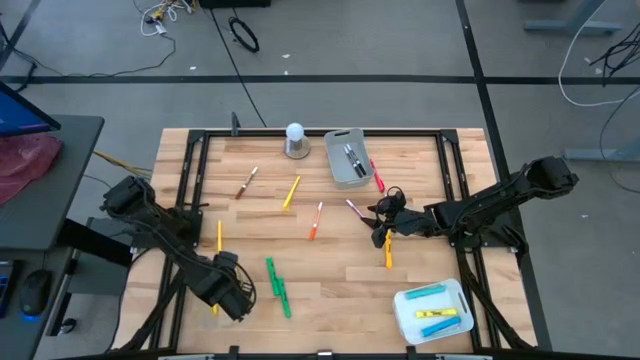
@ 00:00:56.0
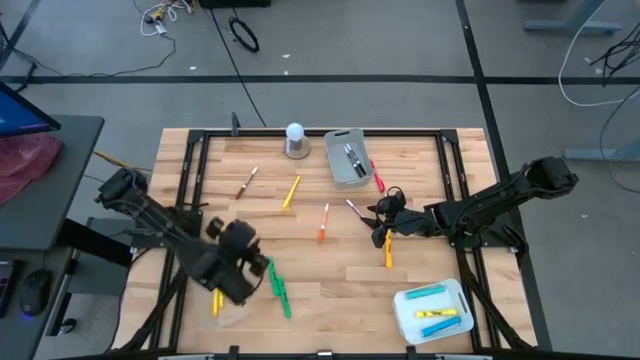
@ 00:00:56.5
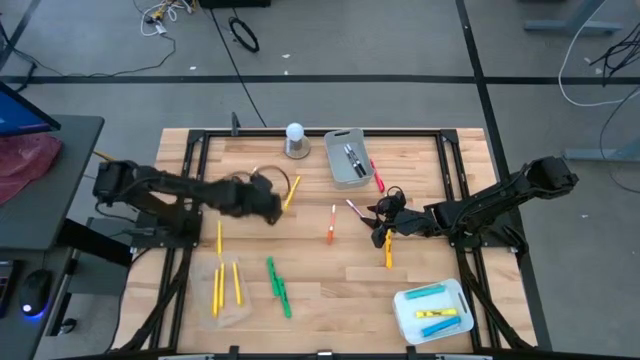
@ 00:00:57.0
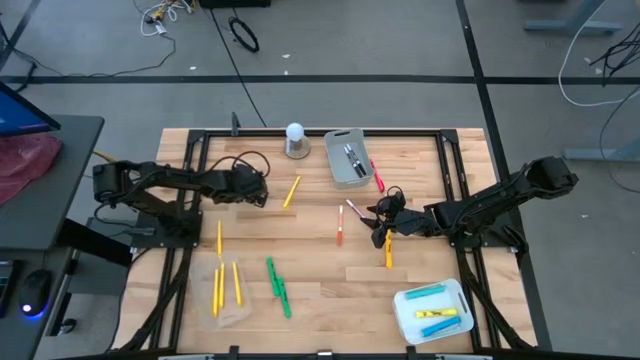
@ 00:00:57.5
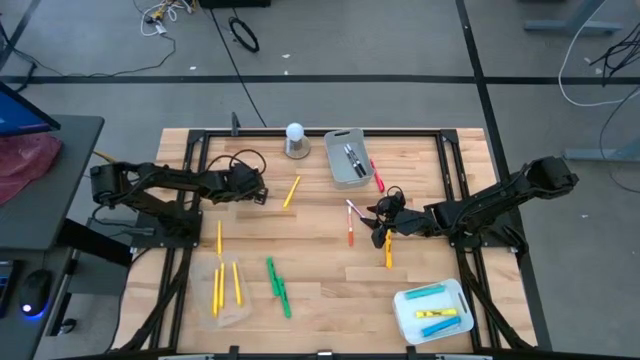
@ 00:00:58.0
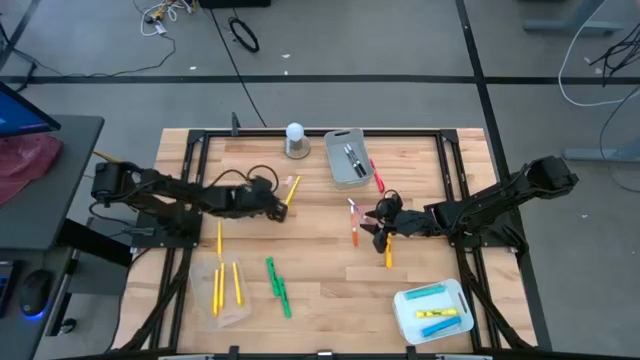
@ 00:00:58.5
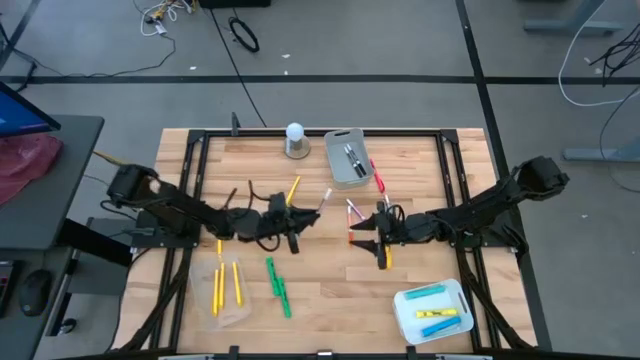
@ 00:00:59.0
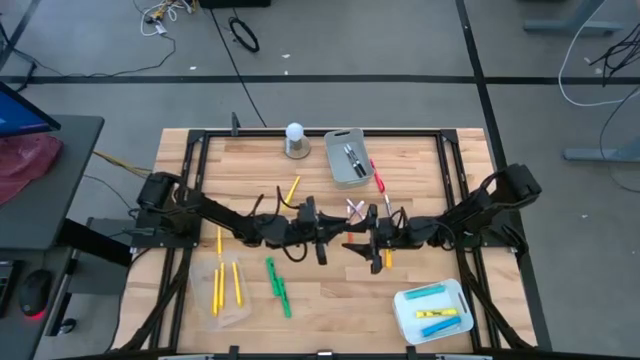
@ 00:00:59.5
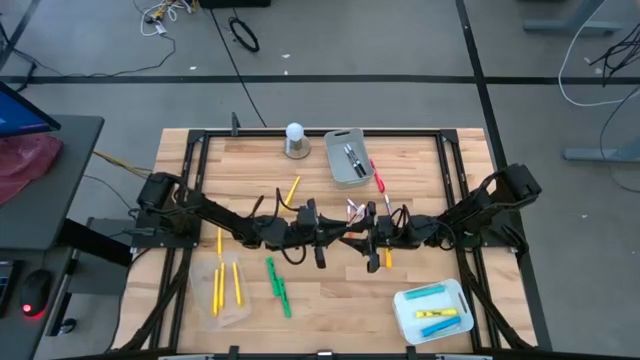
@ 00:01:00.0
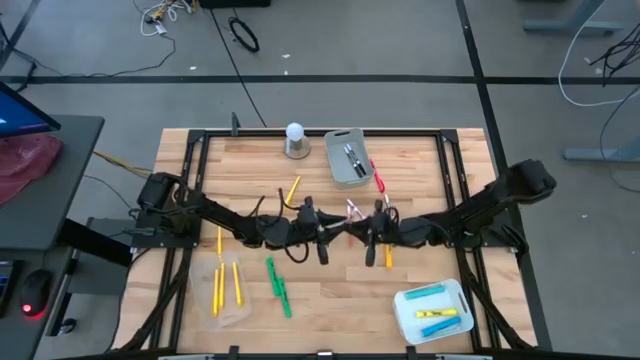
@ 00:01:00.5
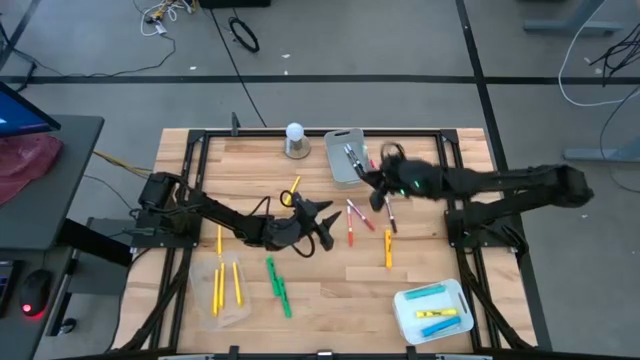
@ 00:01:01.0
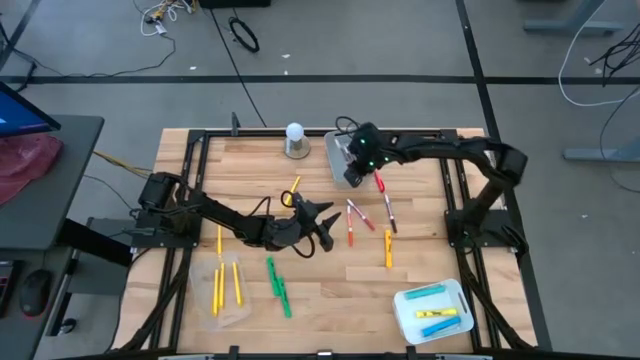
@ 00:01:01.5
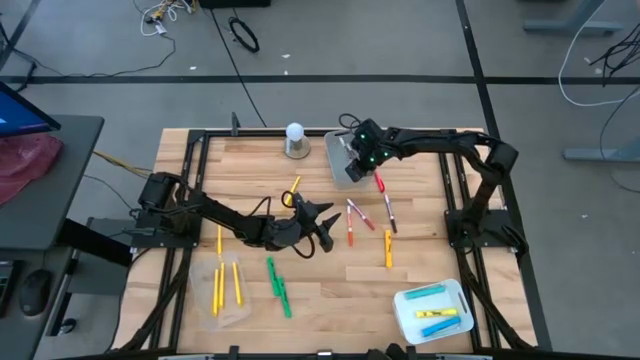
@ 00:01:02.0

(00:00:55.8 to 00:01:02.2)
Task: Pick & Place Markers
Put the brown marker pen into the gray bin

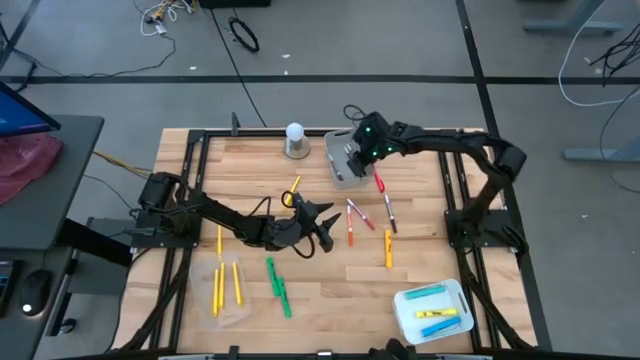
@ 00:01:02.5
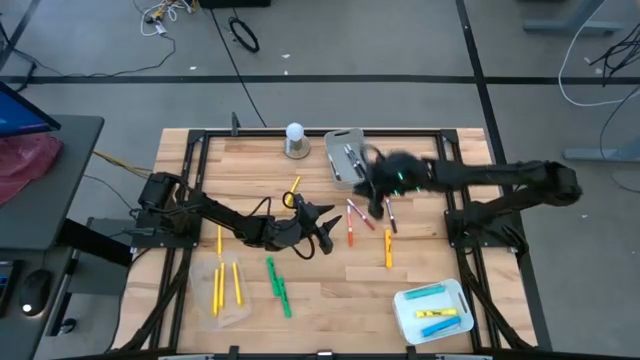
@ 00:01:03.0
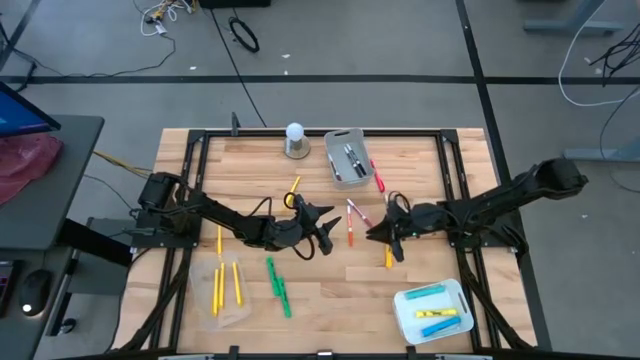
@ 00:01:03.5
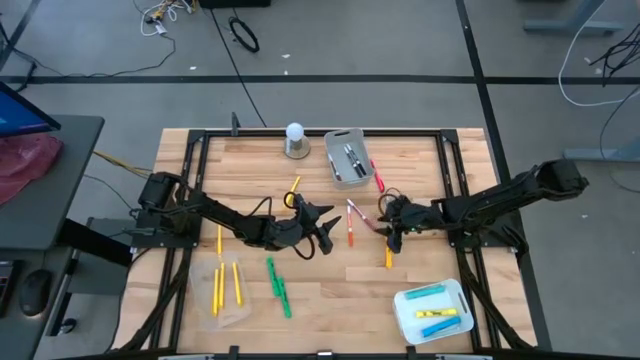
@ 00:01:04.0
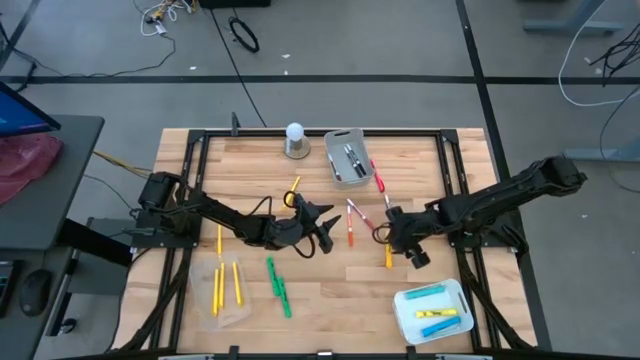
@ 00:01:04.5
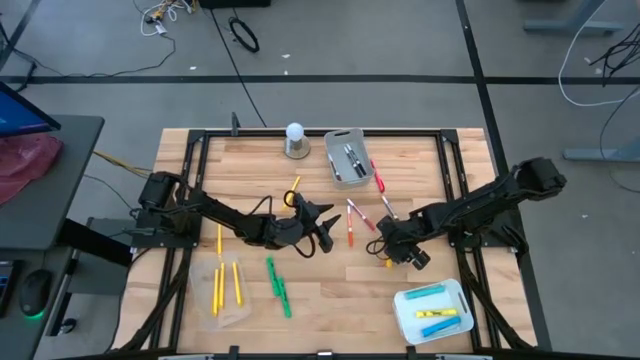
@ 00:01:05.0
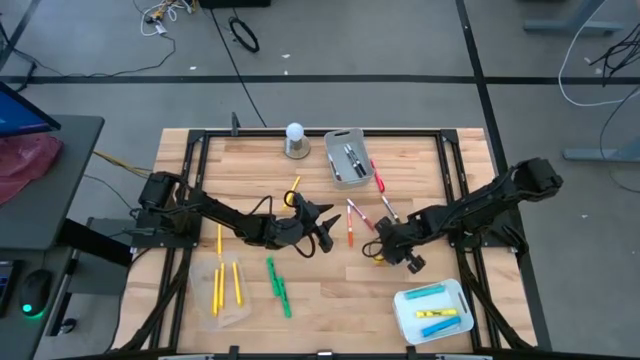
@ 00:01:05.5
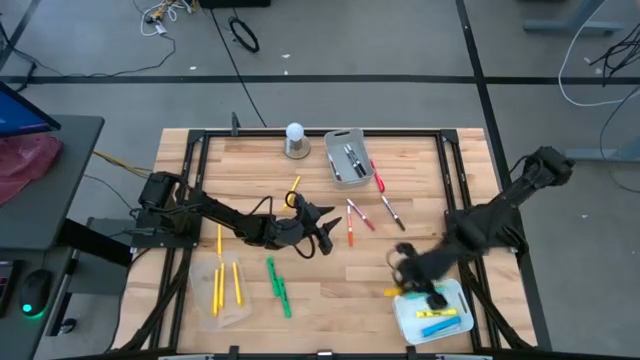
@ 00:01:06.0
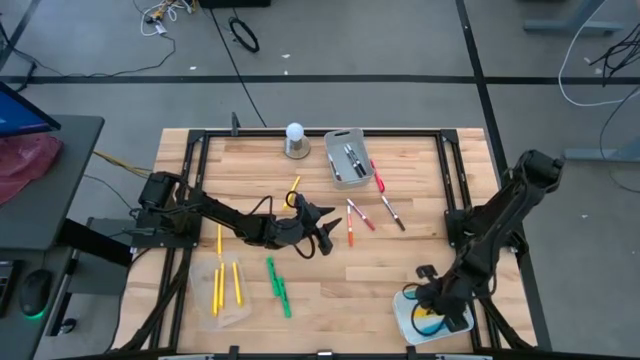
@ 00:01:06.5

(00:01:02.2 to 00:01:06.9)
Put the yellow highlighter pen into the white bin

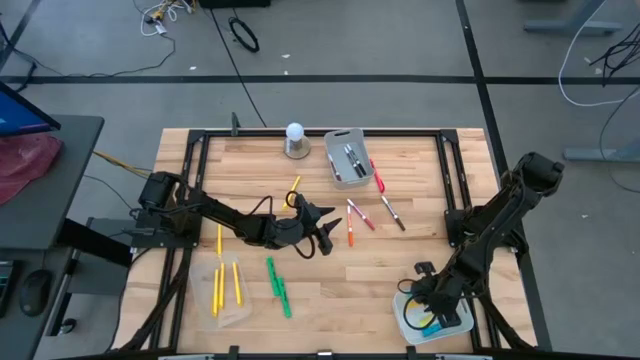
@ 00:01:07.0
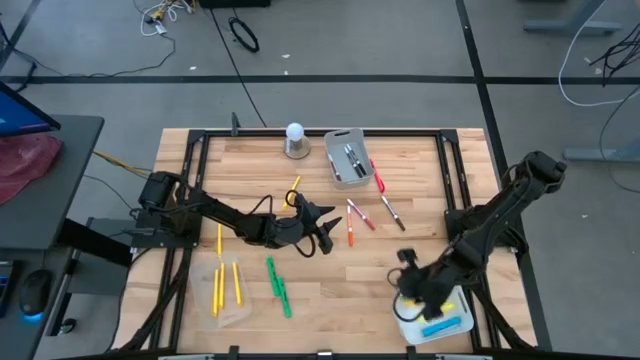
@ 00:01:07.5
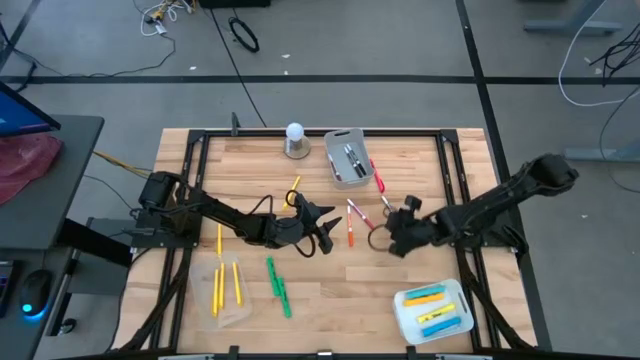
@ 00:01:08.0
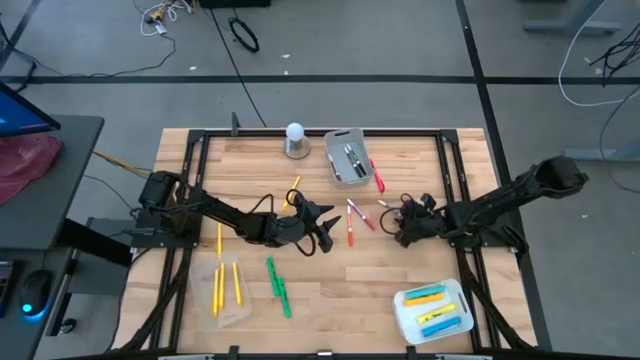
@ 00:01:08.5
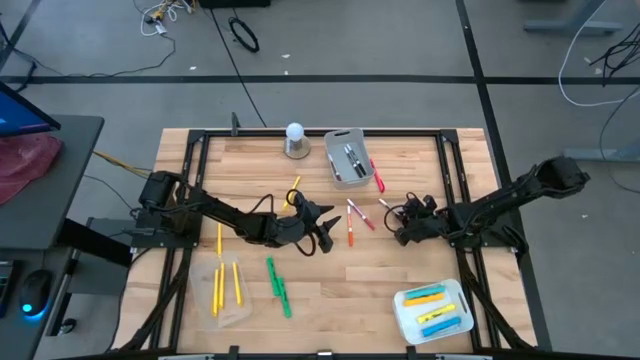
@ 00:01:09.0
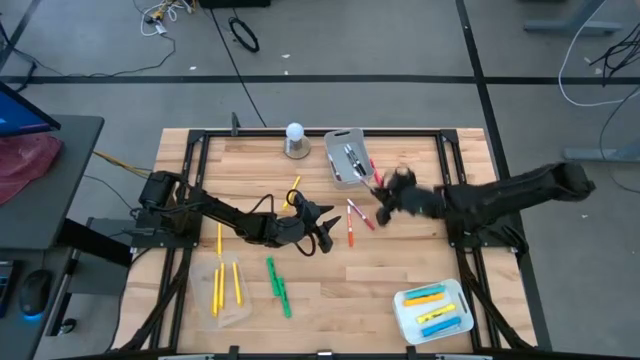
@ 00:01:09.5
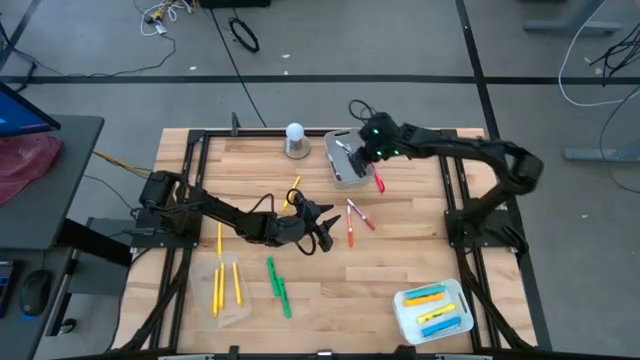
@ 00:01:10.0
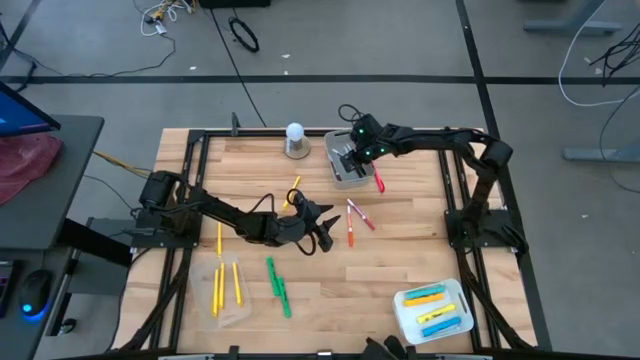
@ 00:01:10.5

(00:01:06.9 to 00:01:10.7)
Put the brown highlighter pen into the gray bin

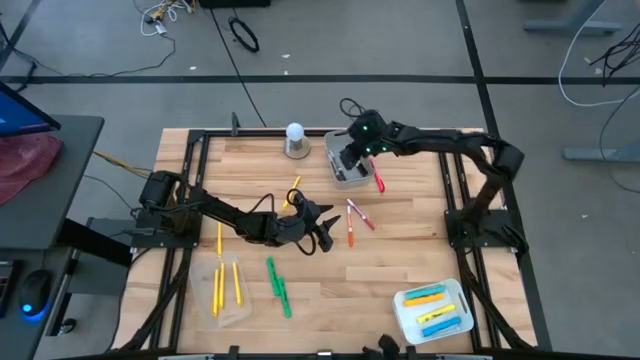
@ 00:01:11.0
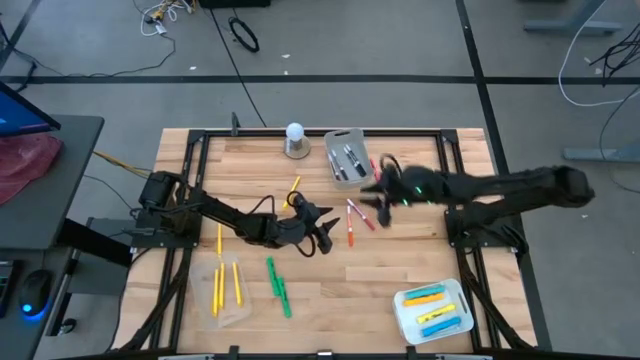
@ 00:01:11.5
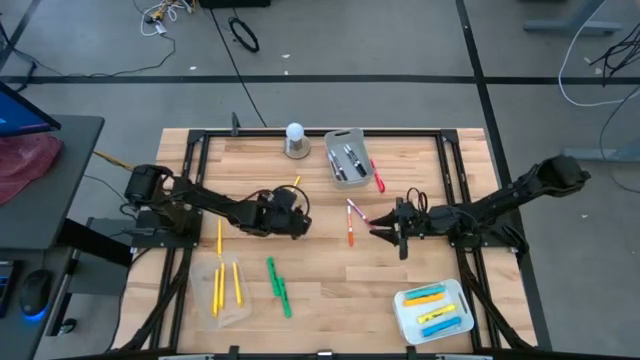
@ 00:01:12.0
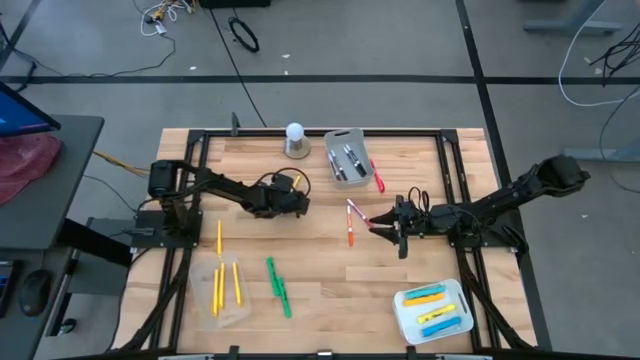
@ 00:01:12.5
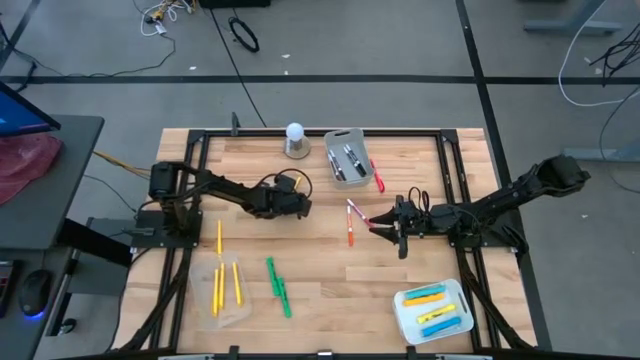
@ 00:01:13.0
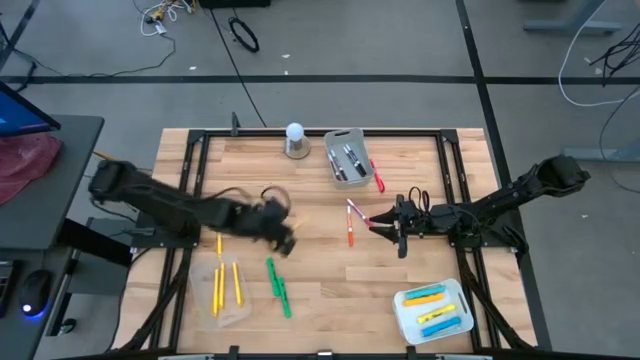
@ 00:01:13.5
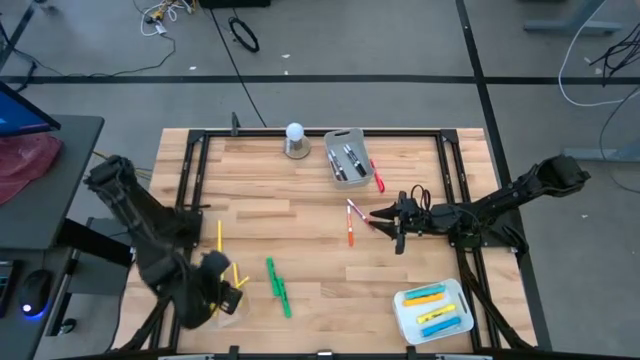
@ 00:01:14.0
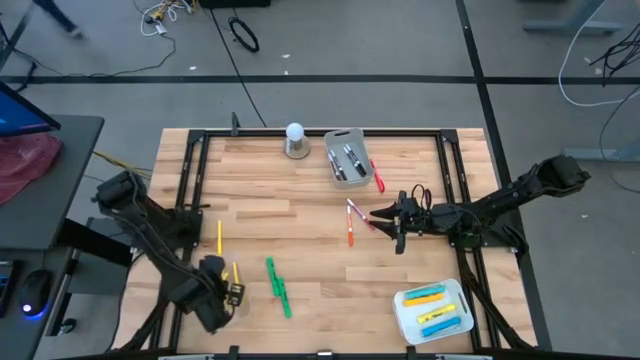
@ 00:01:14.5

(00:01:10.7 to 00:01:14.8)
Put the yellow pen into the transparent bin

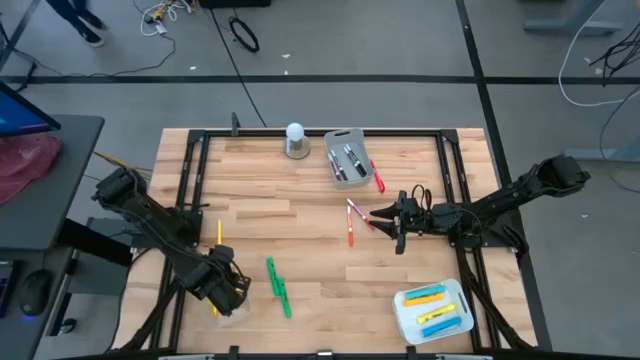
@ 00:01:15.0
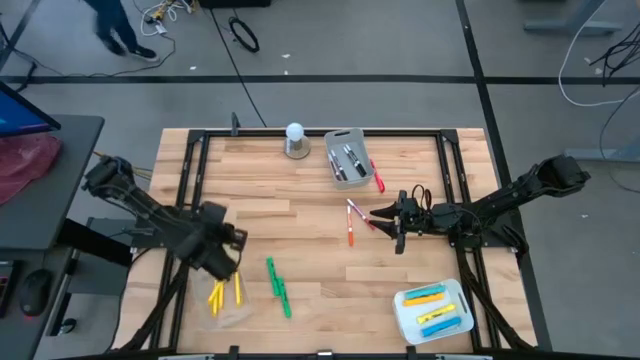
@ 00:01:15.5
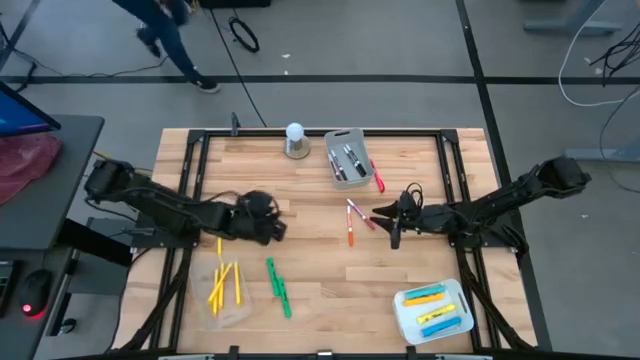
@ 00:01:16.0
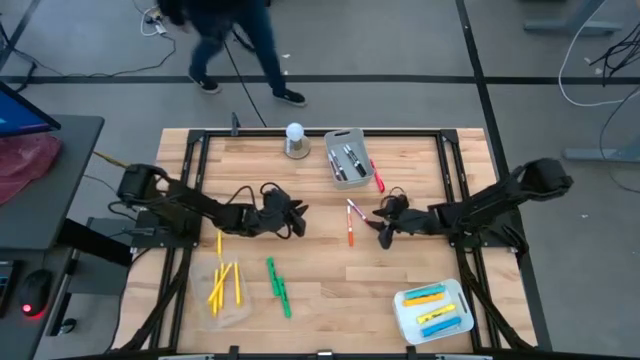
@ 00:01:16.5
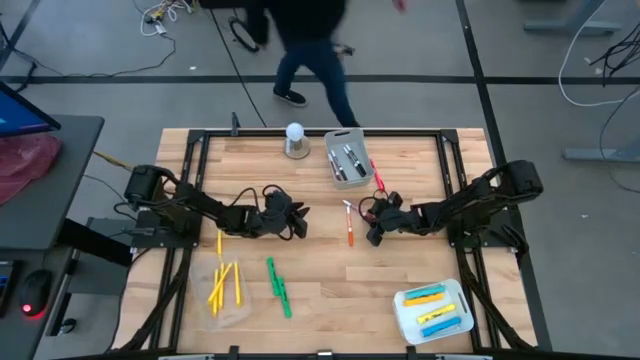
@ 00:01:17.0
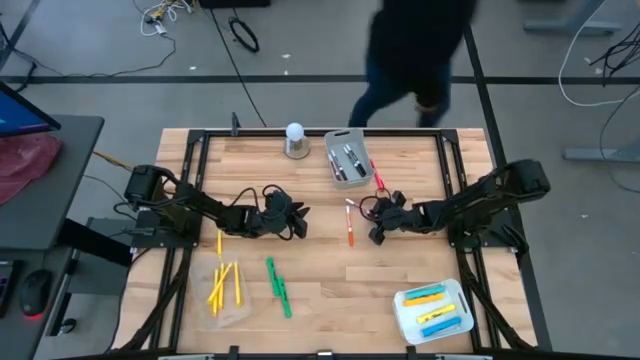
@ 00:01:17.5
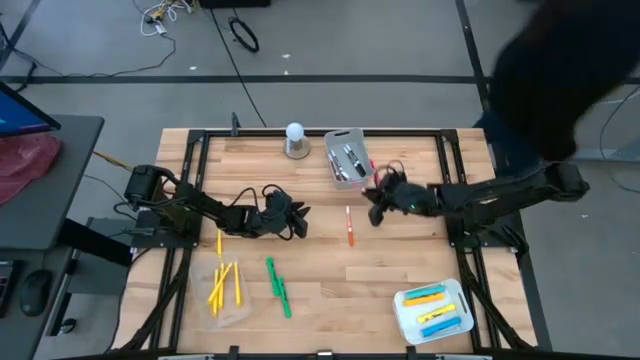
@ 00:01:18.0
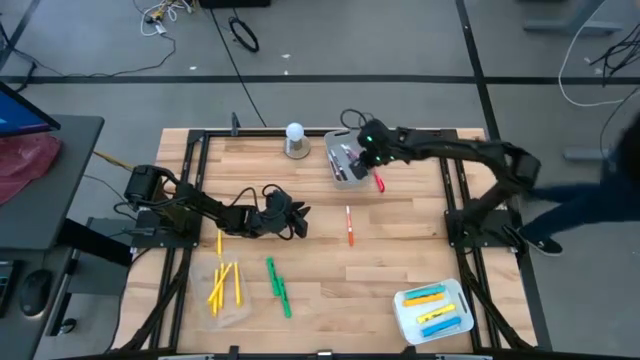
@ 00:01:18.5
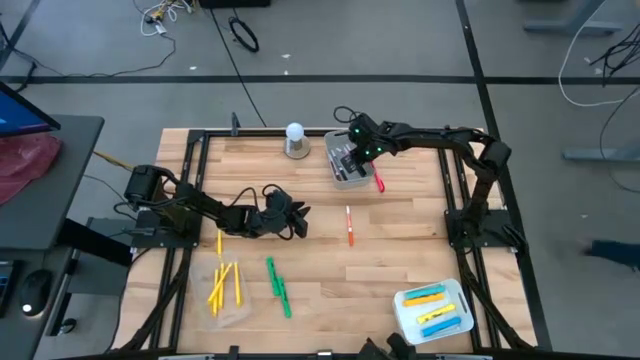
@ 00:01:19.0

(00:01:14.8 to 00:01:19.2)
Put the pink marker pen into the gray bin
